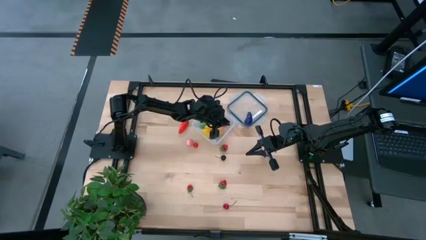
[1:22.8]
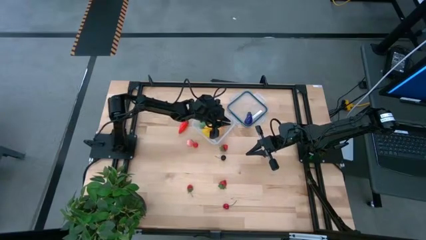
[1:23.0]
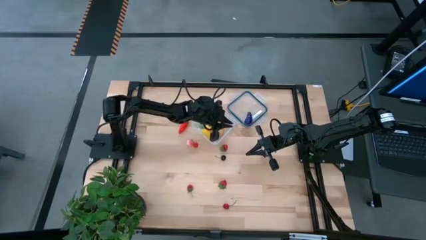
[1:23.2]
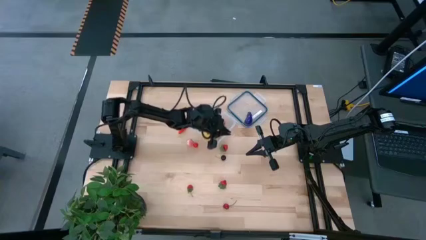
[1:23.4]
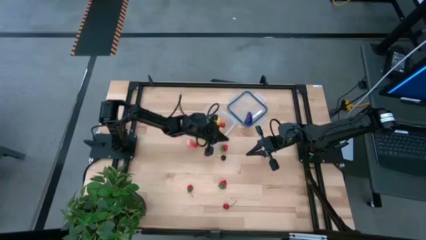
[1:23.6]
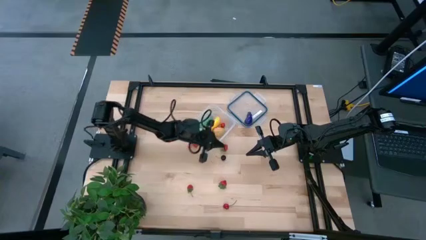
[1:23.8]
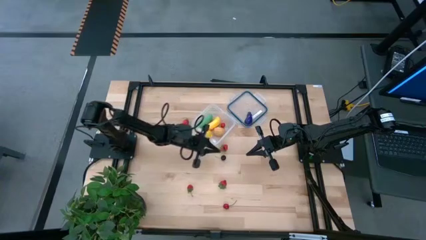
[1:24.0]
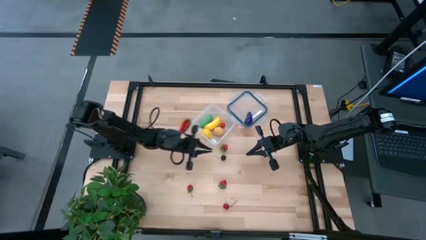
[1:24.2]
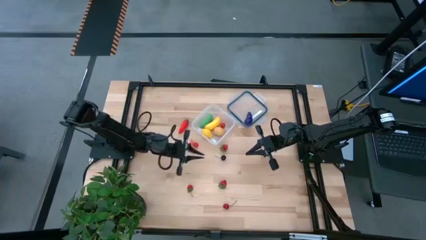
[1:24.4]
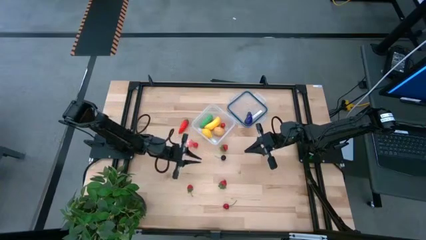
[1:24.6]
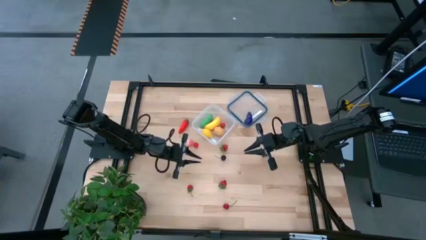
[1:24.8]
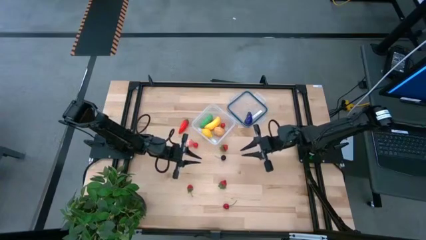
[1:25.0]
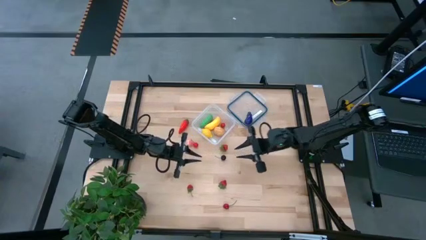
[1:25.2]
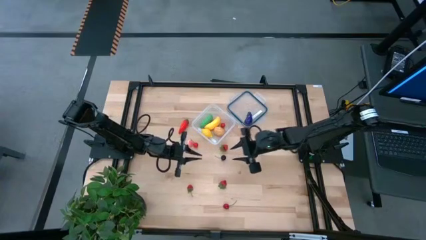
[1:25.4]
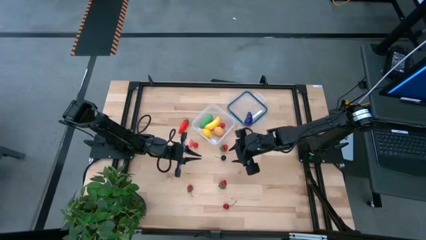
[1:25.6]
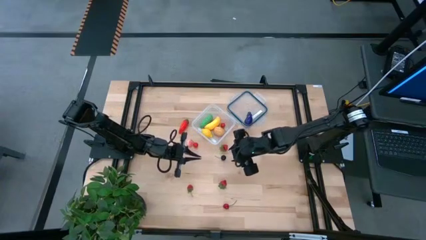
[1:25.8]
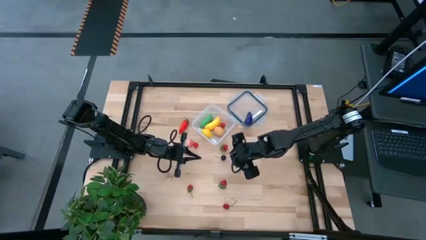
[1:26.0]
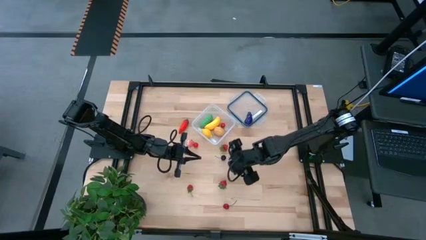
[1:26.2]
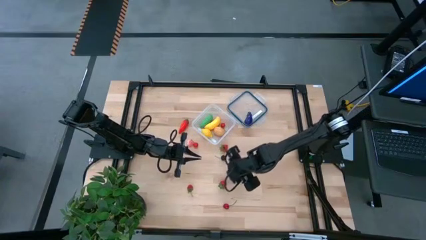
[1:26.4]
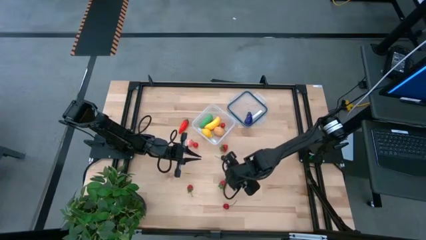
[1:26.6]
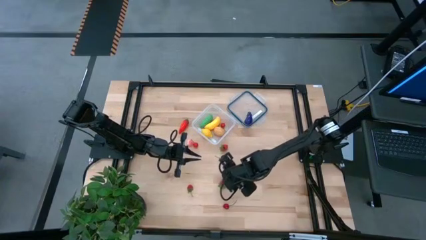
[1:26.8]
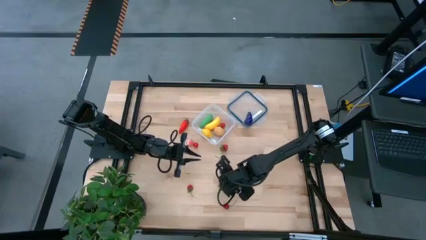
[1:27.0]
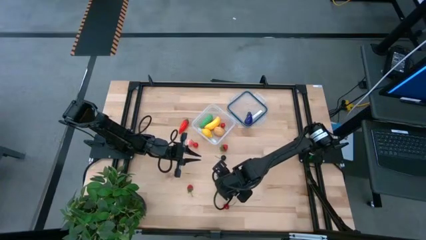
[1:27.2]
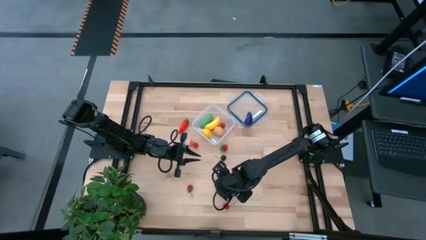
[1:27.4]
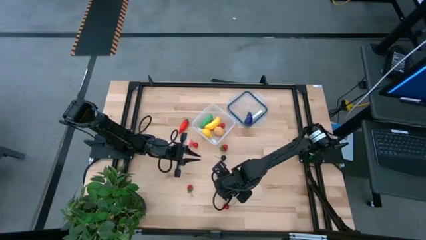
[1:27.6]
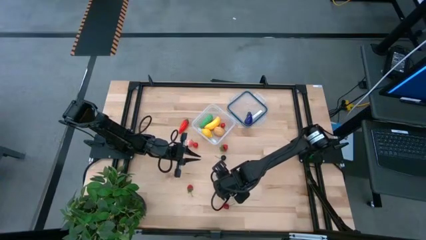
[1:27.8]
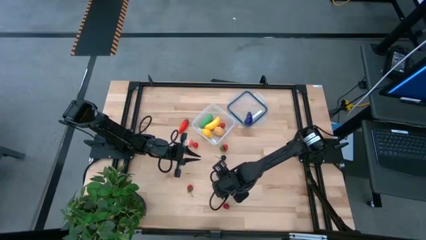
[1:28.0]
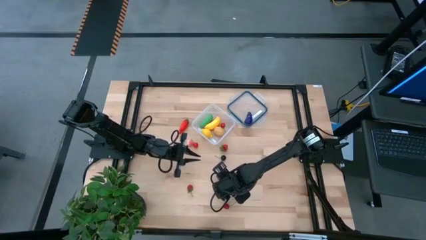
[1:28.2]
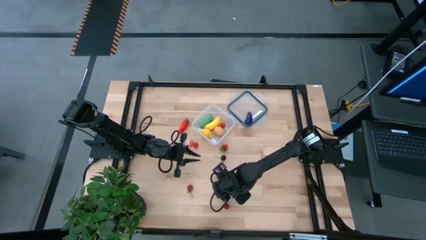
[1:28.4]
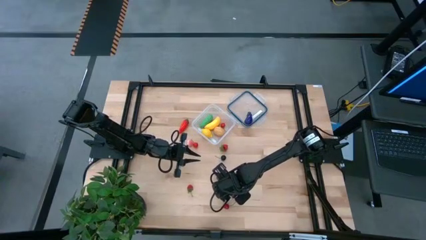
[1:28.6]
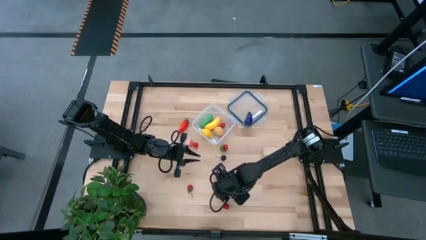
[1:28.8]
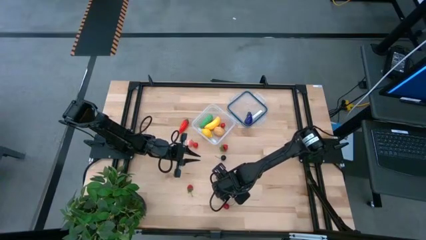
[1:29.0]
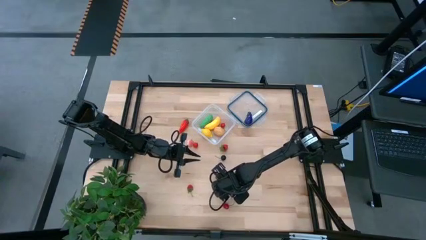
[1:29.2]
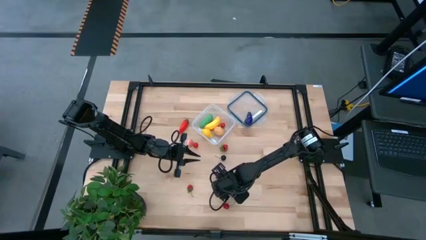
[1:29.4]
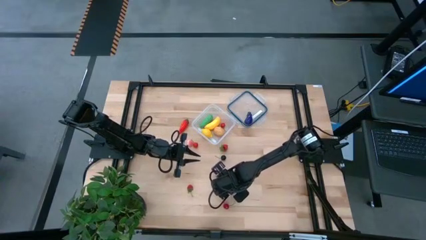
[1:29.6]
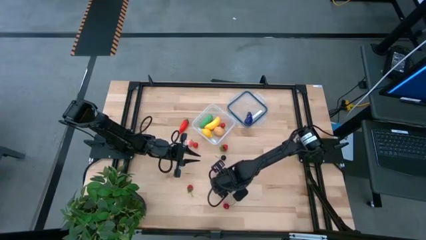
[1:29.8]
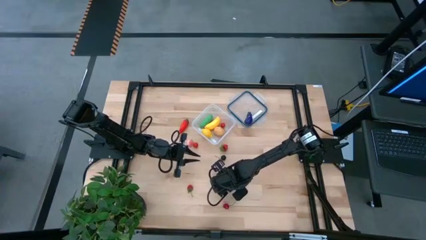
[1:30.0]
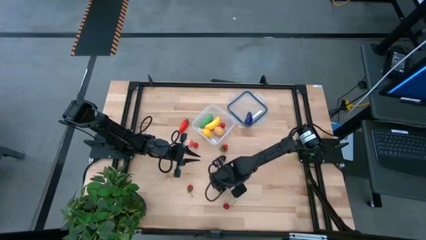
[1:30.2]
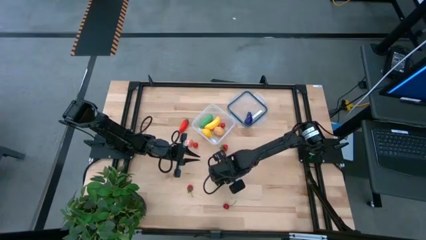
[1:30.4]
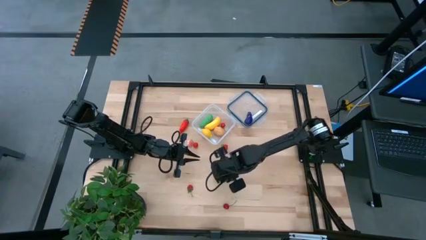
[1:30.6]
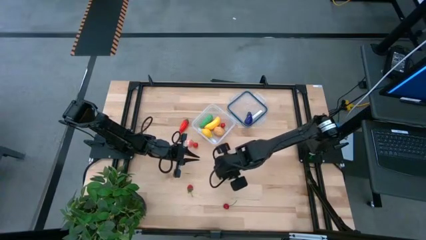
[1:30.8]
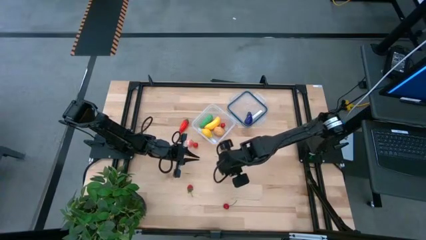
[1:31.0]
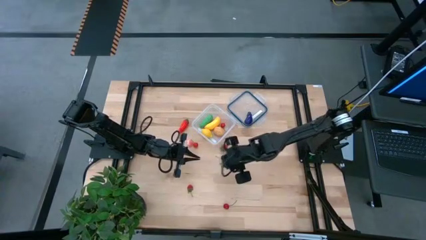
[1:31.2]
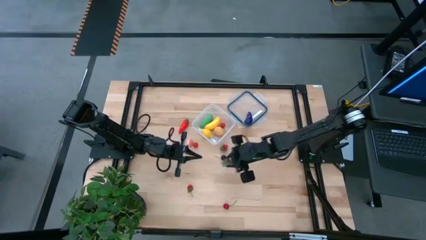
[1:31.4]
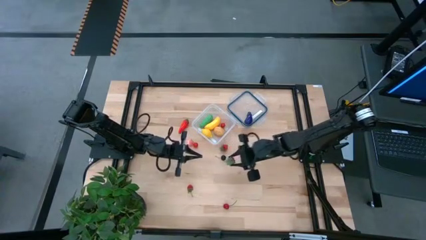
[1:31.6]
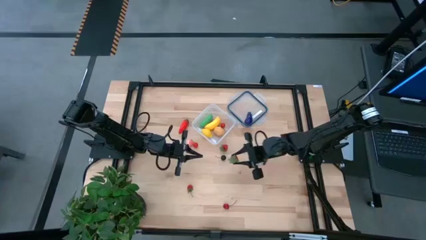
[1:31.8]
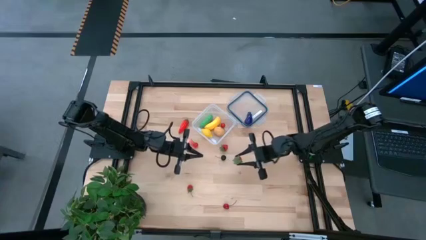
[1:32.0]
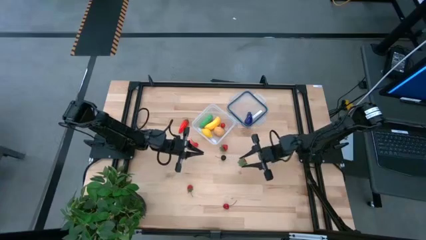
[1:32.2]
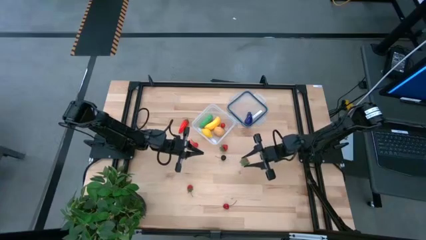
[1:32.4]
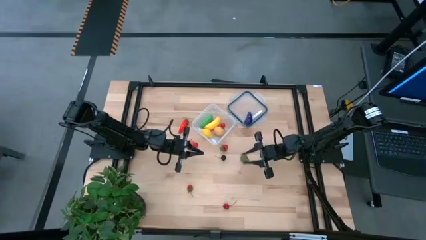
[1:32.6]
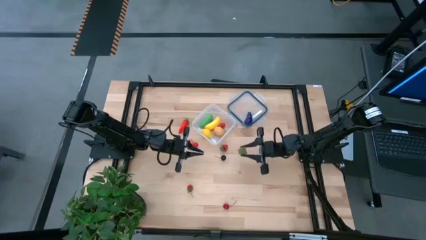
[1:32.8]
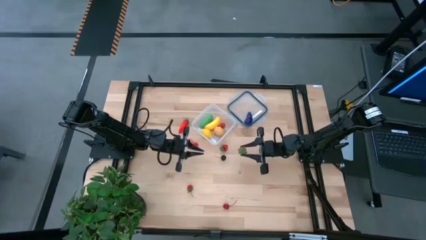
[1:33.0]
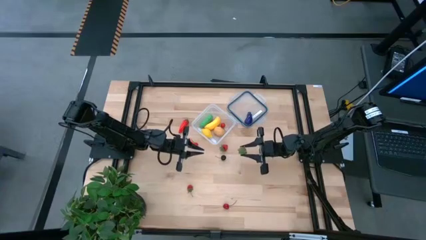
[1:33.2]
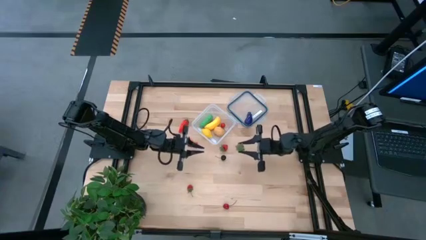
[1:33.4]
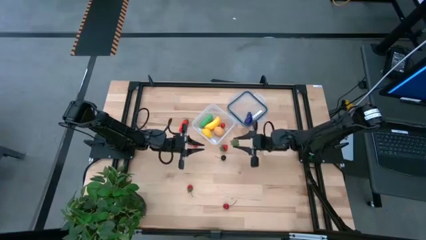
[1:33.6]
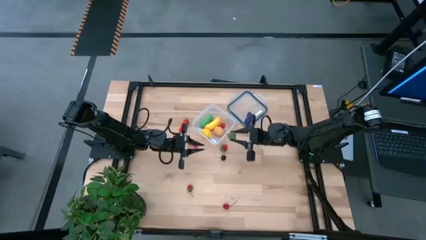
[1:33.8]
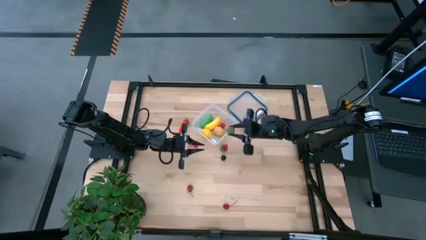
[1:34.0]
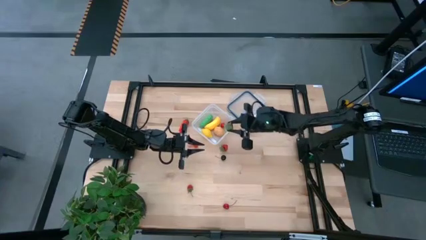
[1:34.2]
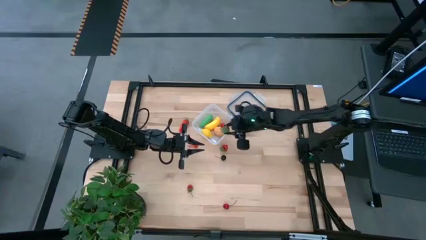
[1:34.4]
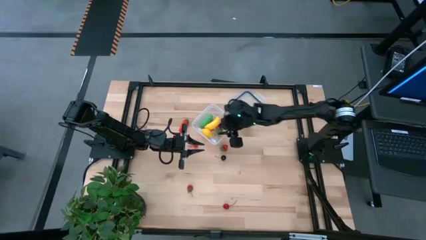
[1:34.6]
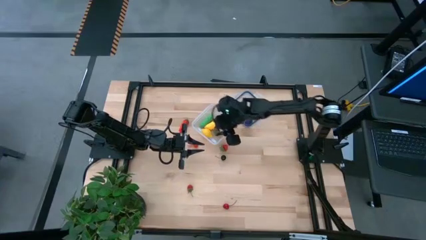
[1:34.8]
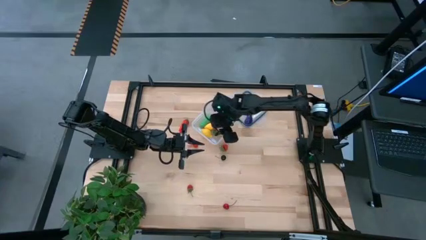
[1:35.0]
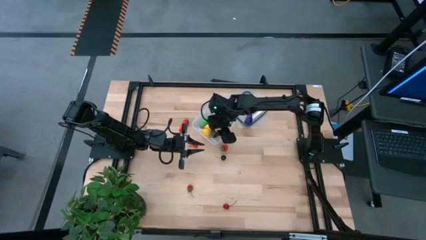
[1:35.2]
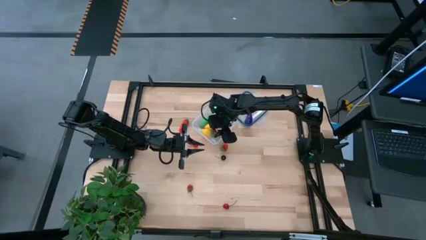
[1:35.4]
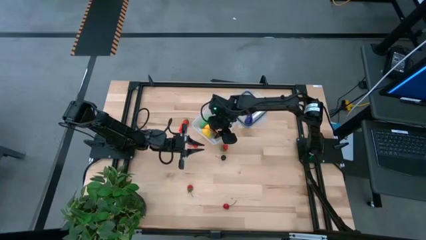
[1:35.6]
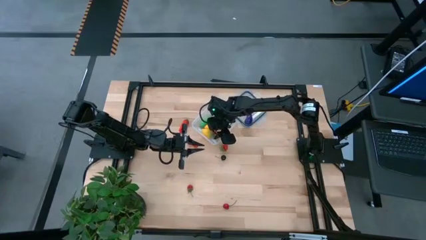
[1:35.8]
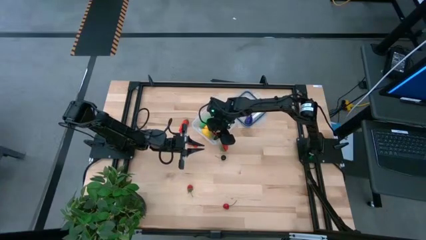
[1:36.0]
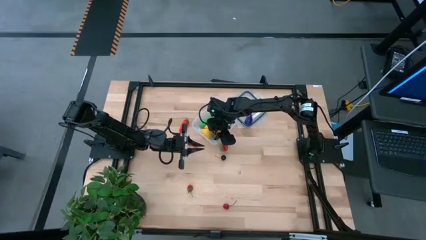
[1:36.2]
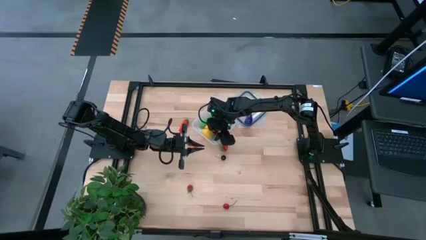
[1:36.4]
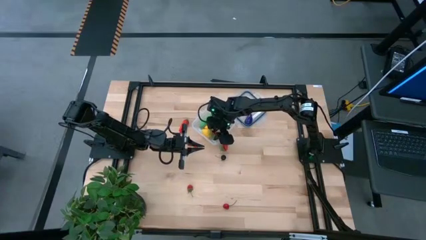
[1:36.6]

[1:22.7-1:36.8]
Task: Pick and placing Produce into tupperware
Put the middle red strawberry into the transparent container

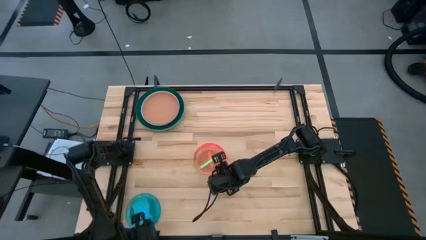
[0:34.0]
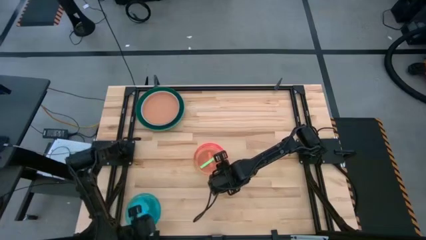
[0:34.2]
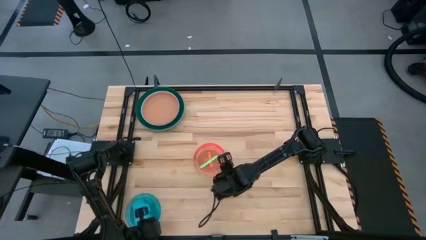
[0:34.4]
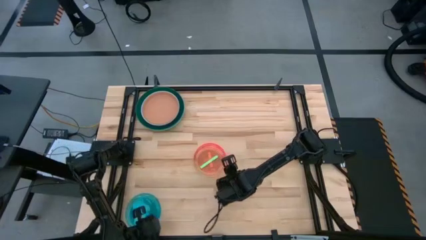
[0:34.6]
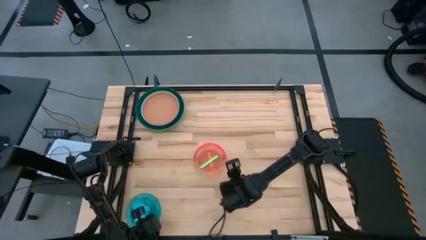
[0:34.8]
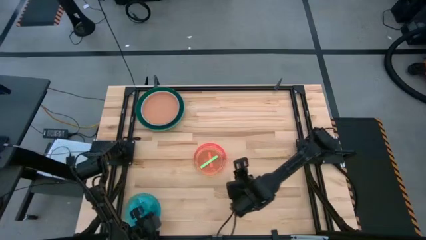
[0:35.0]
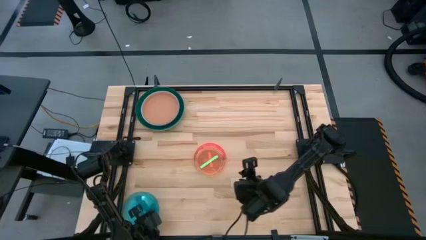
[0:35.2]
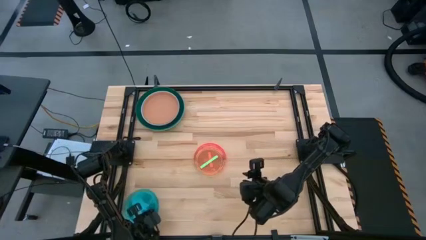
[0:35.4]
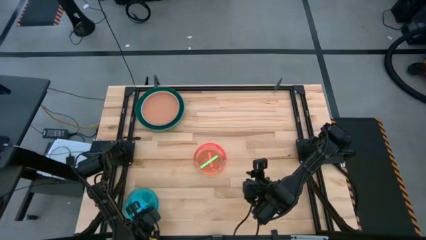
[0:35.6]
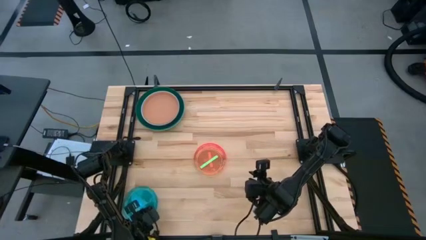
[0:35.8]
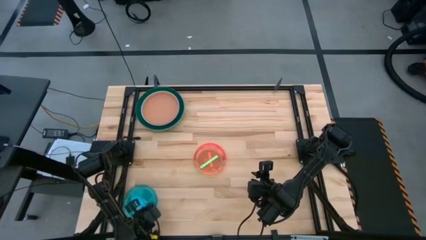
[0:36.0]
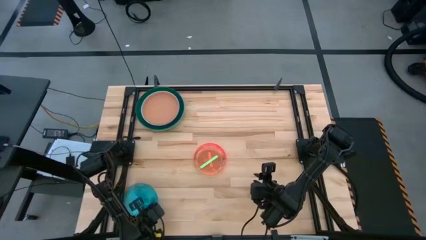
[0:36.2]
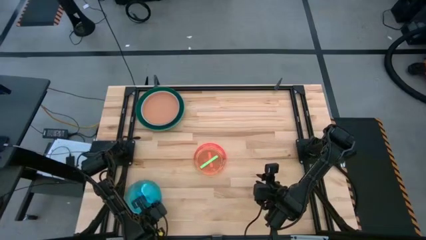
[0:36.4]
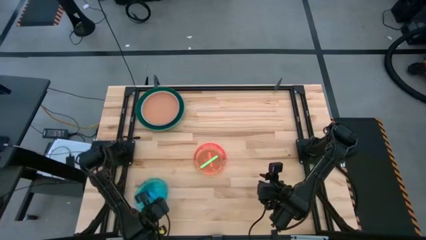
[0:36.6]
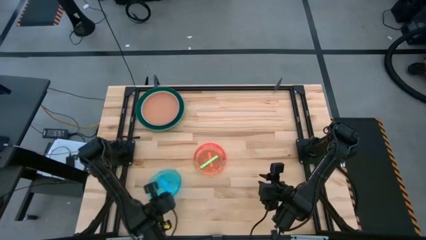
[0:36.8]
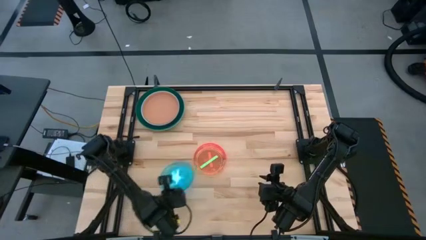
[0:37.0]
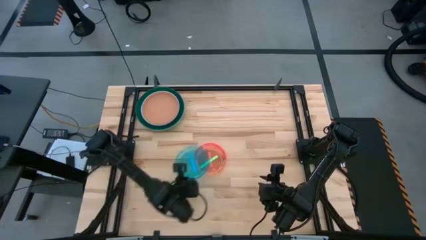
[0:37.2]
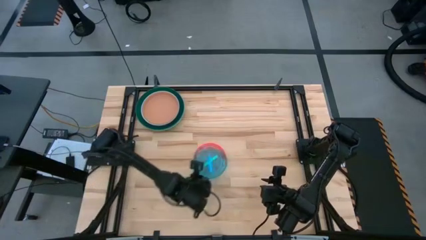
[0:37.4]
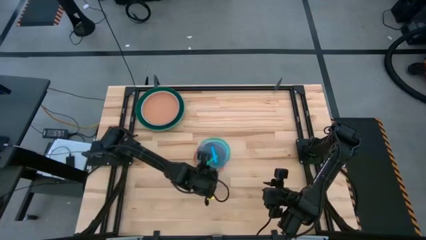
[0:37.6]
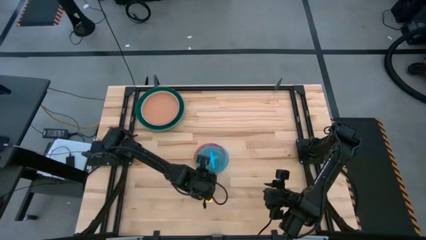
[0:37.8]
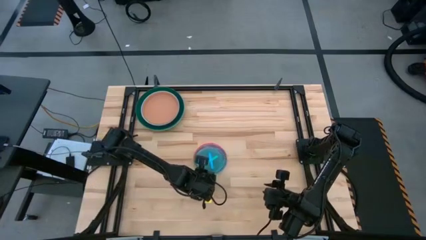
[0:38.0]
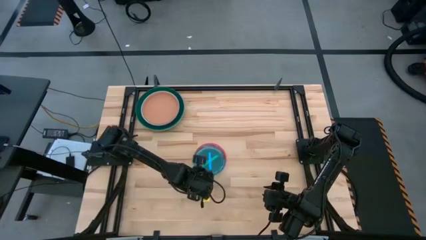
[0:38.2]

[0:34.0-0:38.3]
Task: Stack plastic plates
Stack the light blue plate on top of the light green plate
